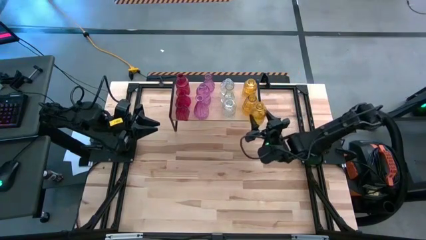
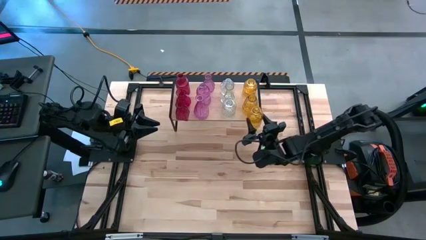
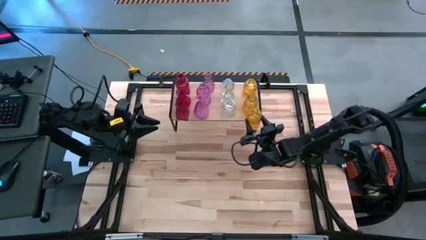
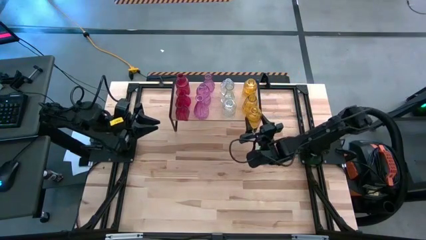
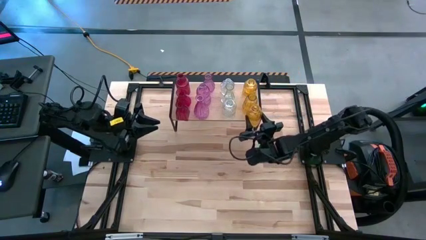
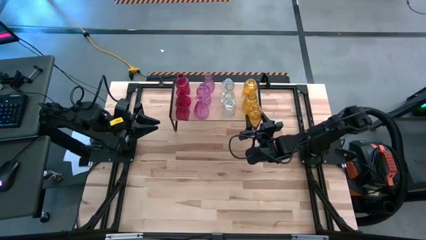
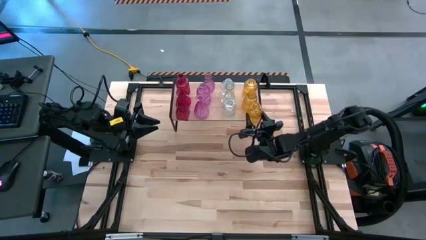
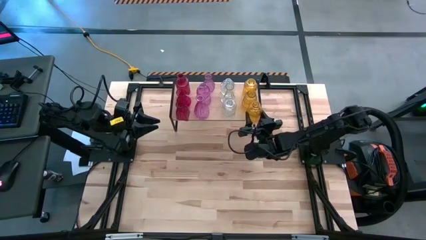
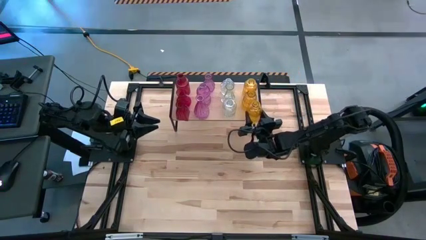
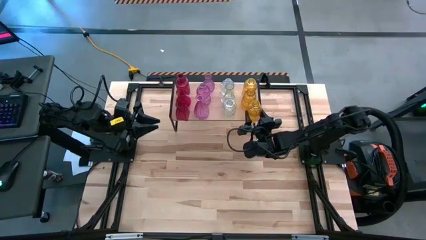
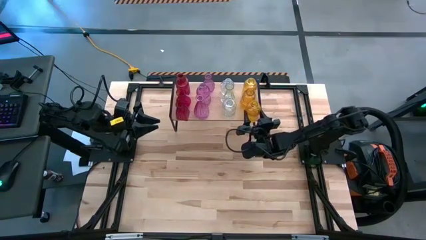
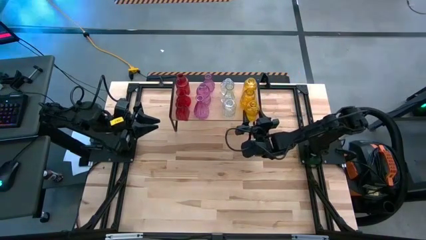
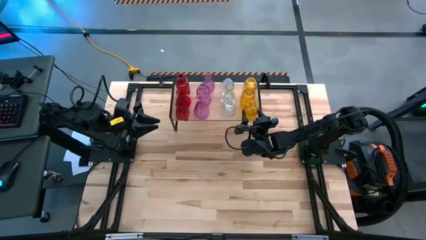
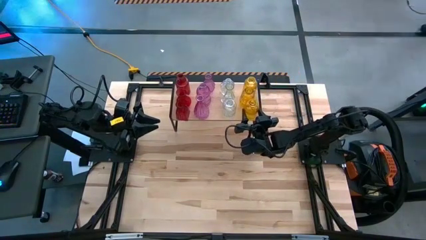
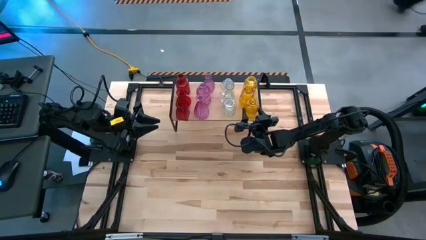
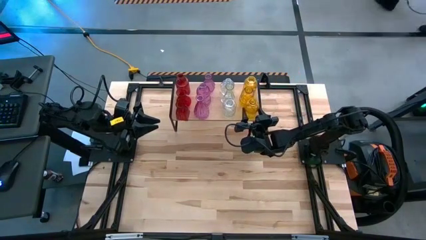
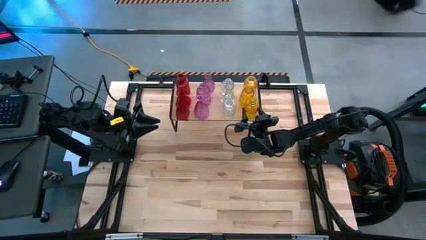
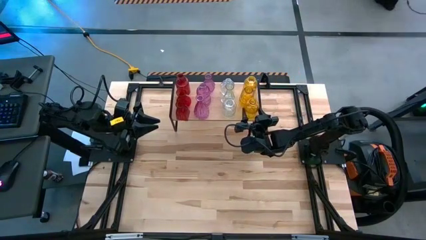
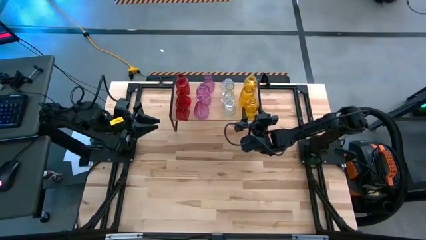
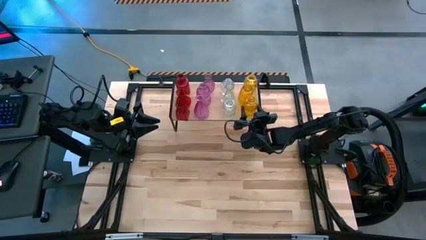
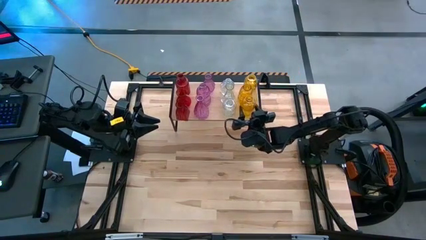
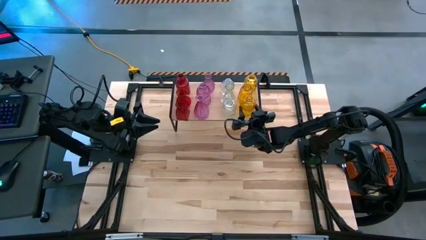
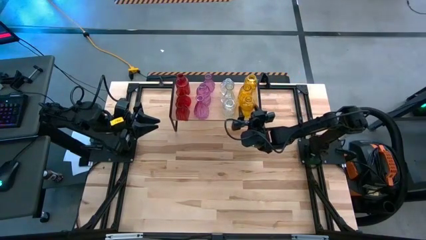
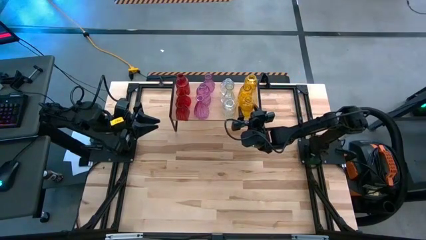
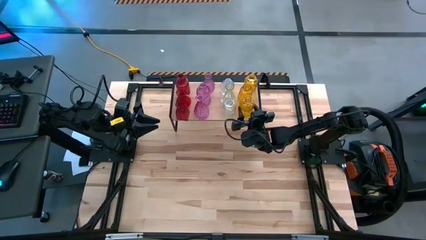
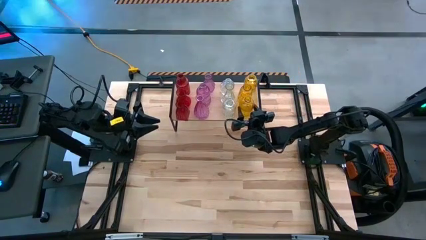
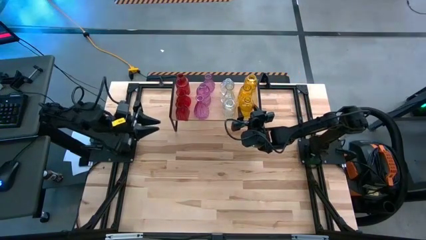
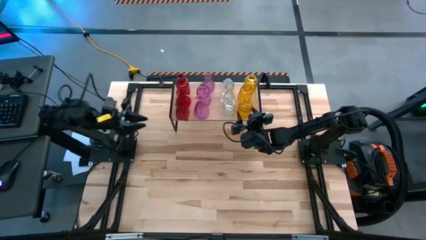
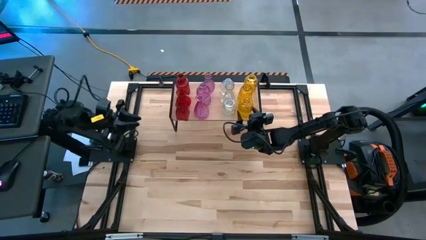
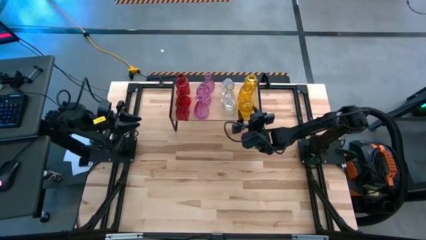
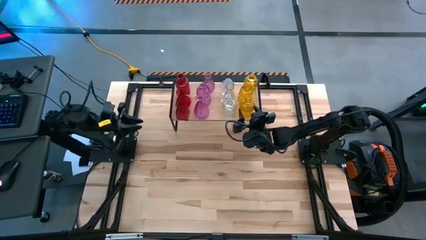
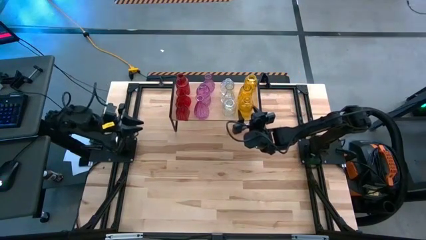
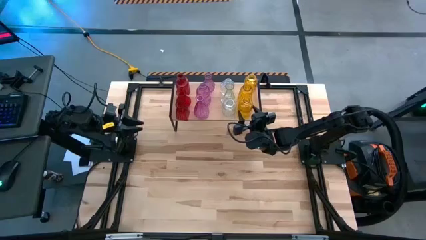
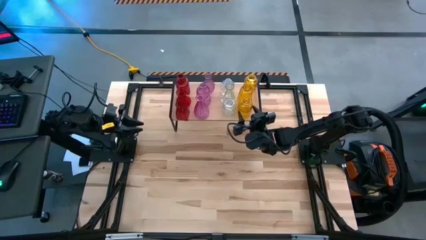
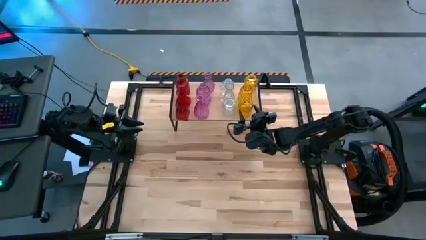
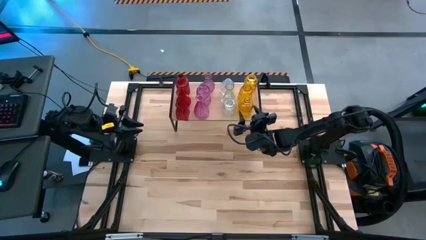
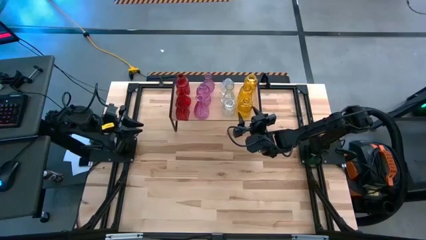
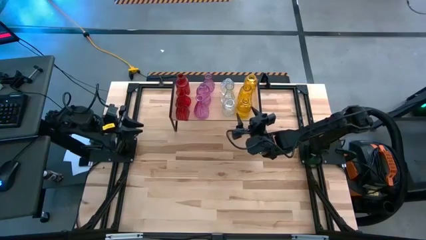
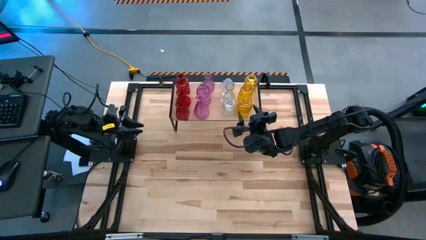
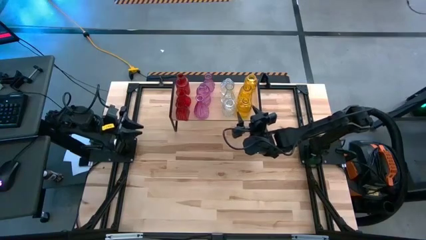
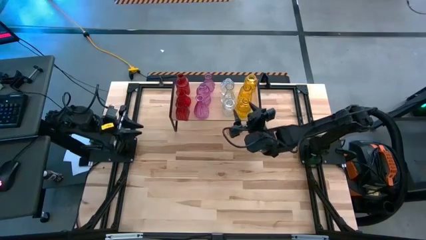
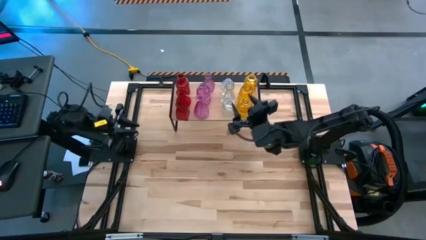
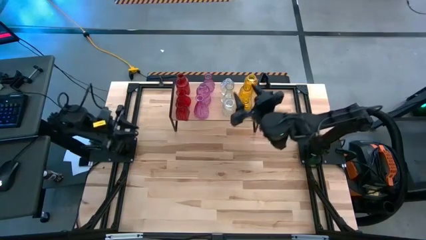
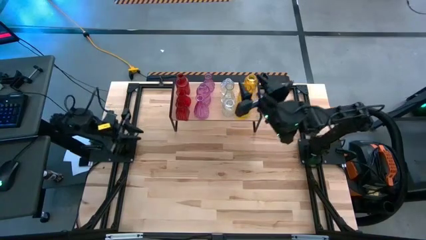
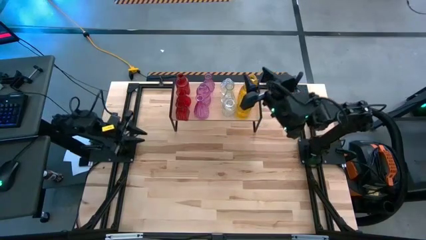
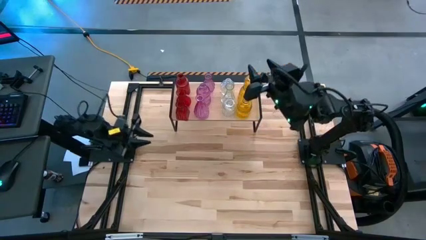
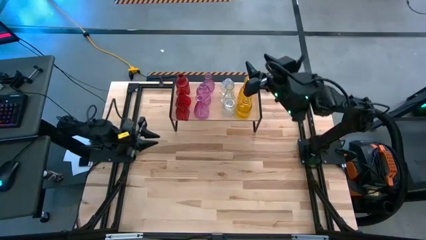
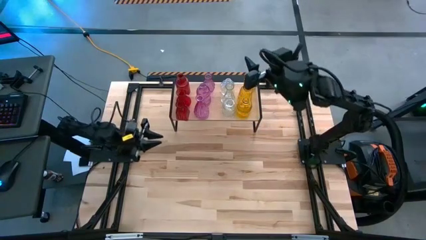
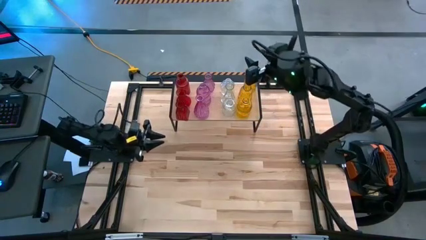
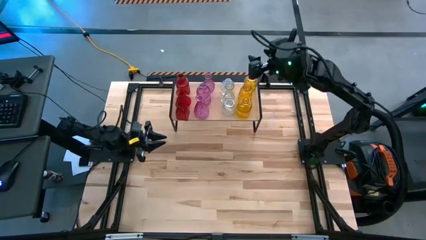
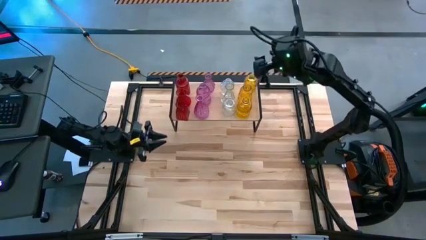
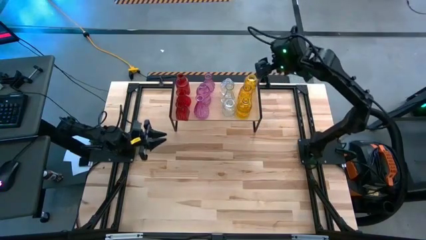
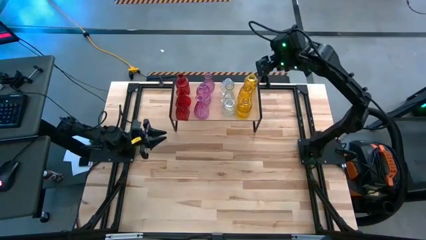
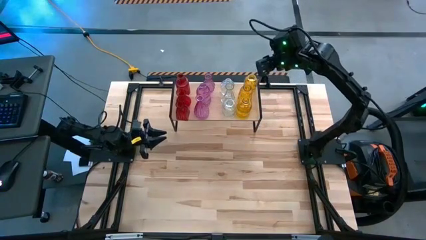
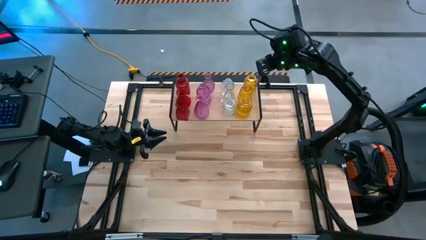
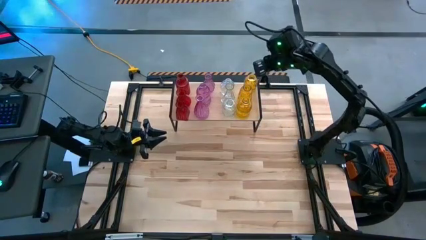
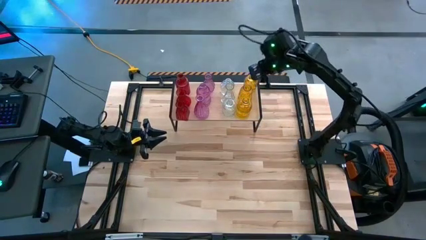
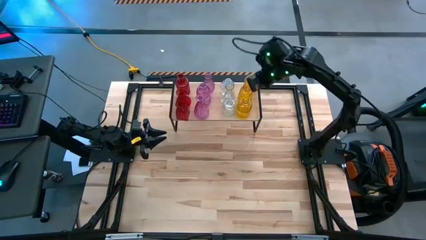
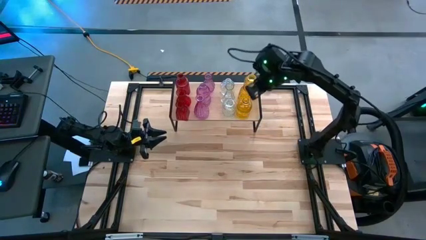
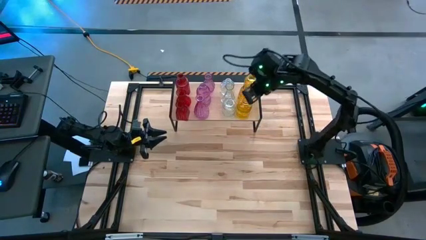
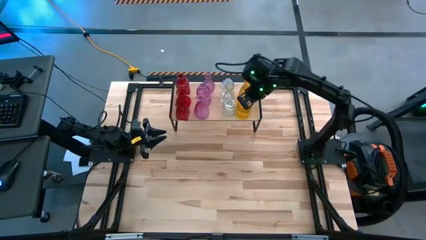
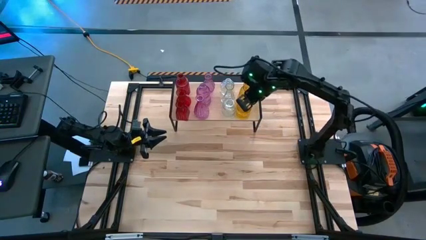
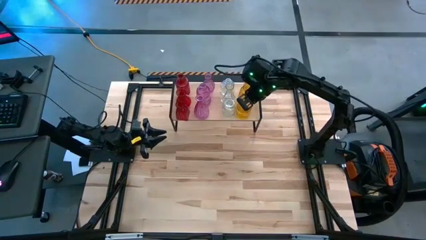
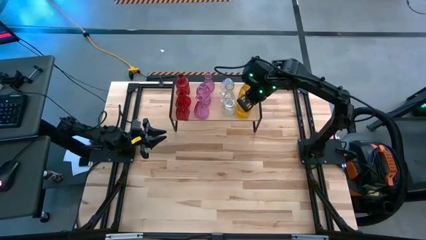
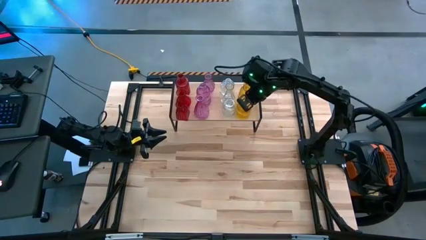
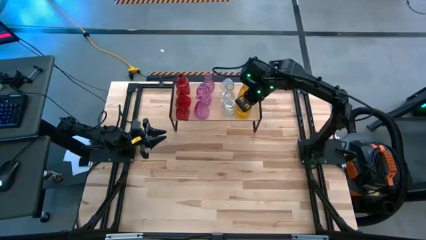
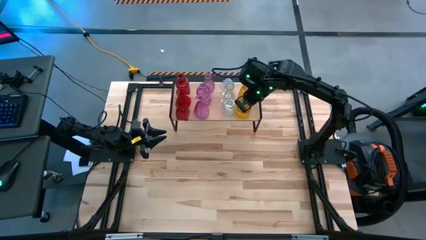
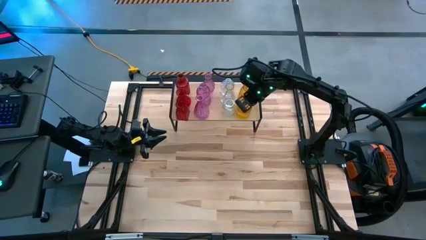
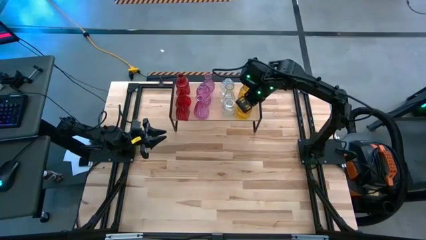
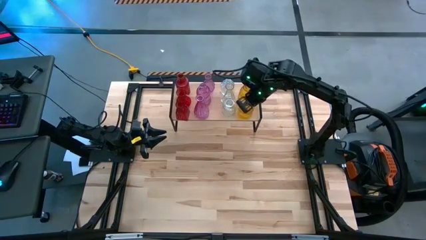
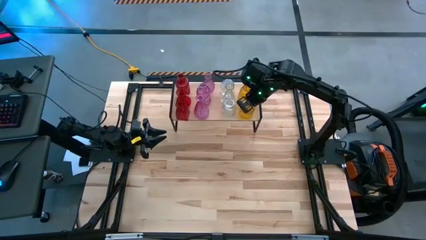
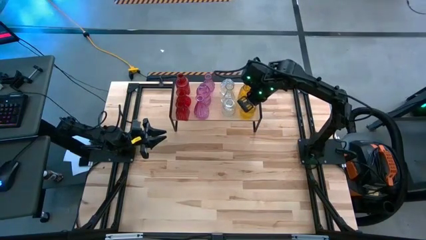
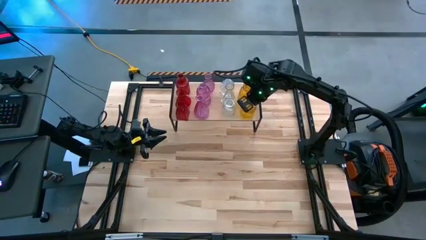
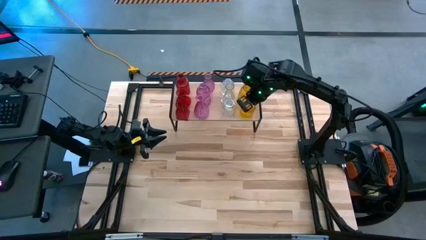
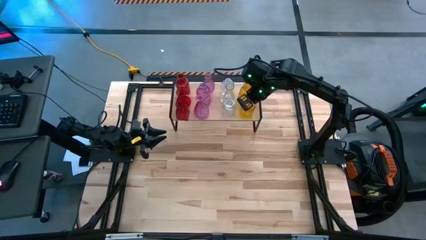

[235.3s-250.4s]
Task: sort vases onto shelf
Put the yellow vase on the shelf aligned with the other yellow vases
